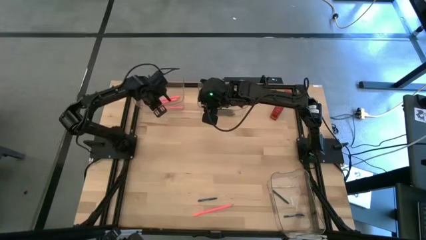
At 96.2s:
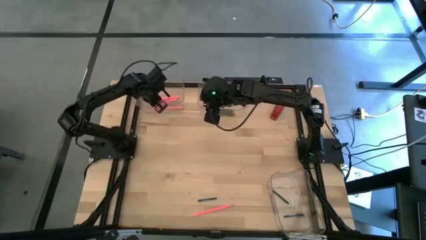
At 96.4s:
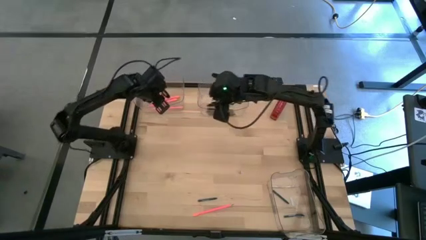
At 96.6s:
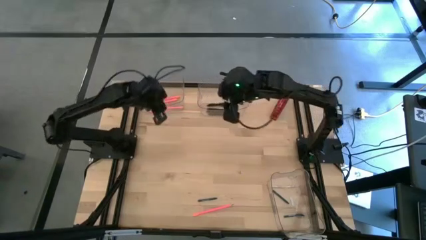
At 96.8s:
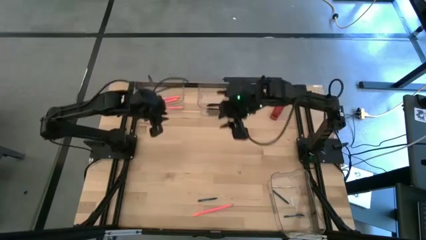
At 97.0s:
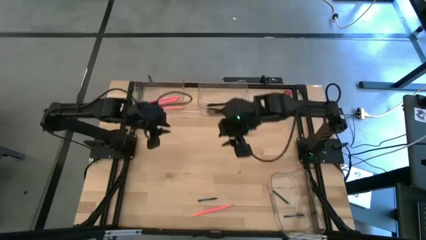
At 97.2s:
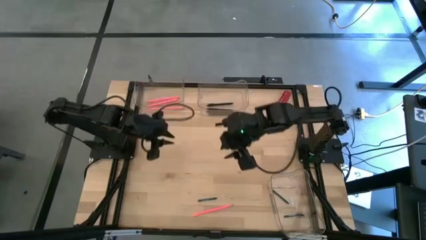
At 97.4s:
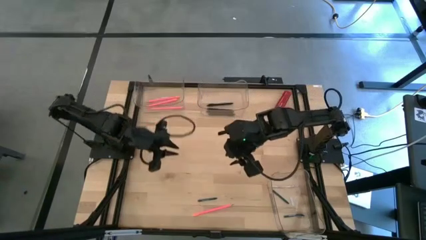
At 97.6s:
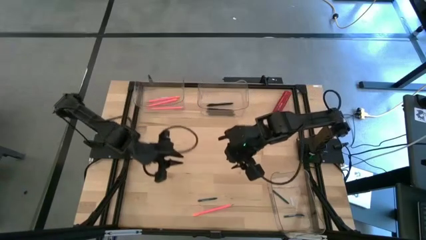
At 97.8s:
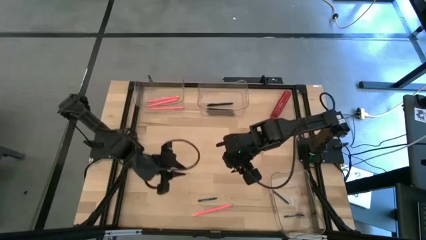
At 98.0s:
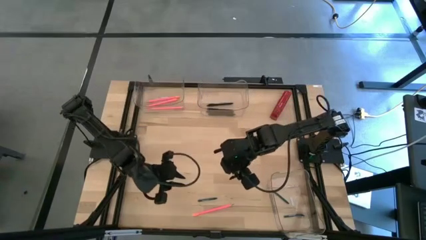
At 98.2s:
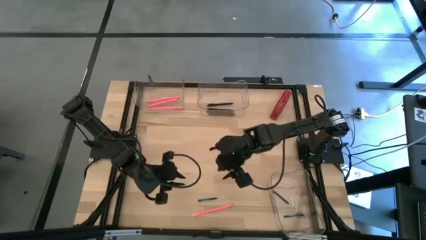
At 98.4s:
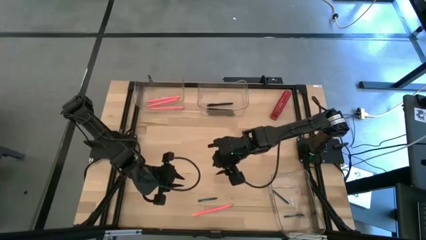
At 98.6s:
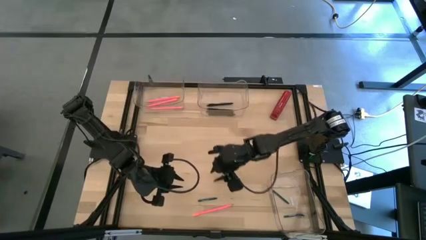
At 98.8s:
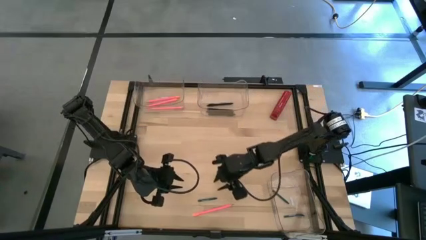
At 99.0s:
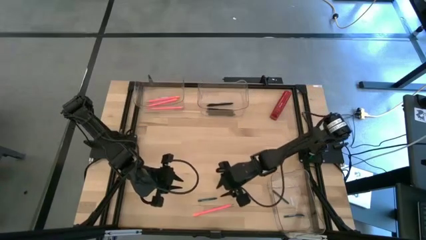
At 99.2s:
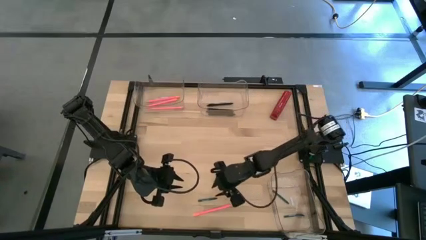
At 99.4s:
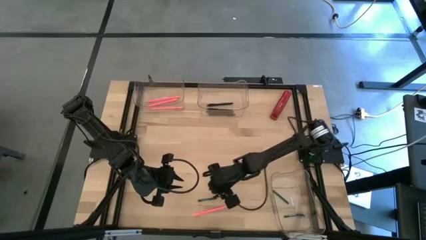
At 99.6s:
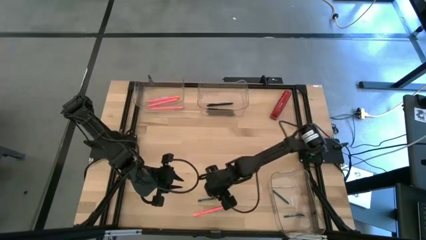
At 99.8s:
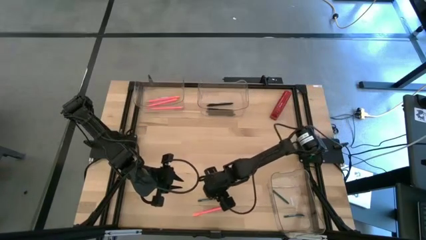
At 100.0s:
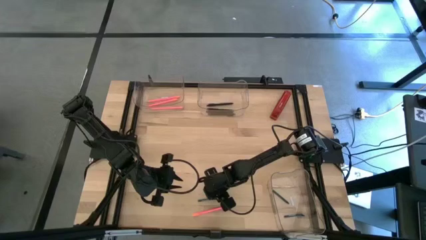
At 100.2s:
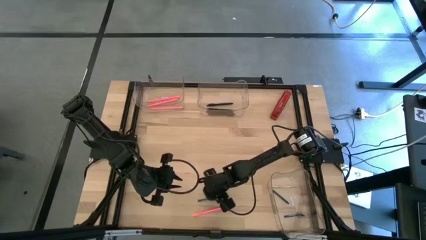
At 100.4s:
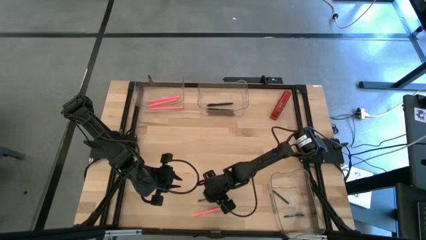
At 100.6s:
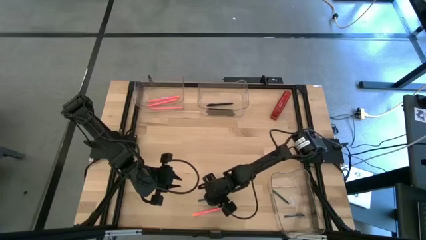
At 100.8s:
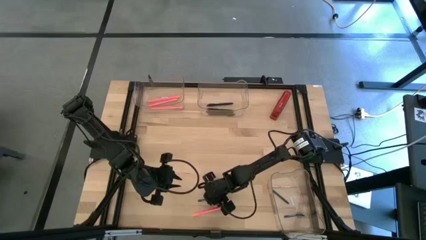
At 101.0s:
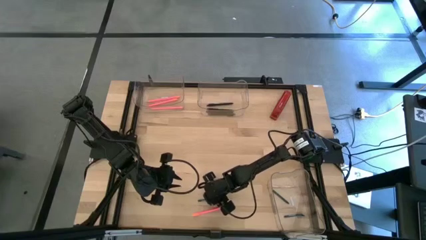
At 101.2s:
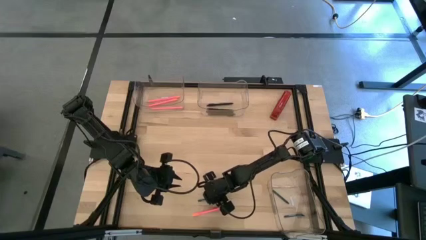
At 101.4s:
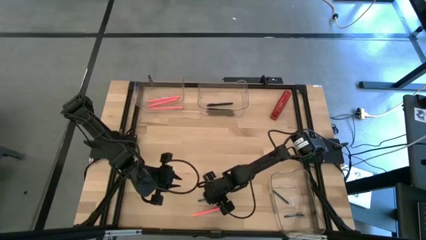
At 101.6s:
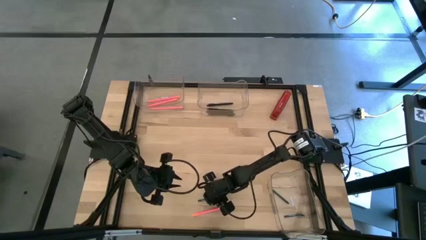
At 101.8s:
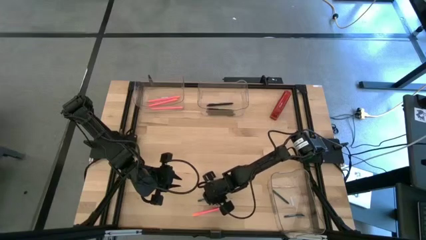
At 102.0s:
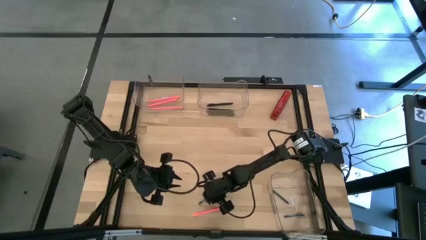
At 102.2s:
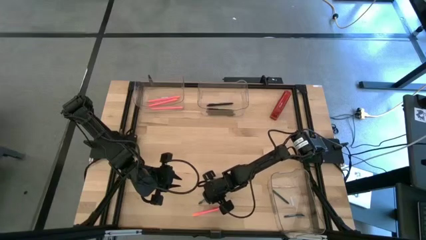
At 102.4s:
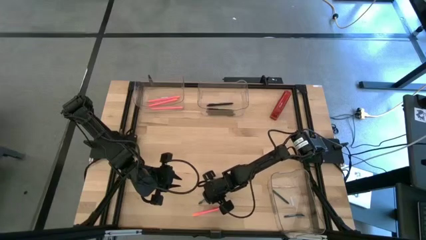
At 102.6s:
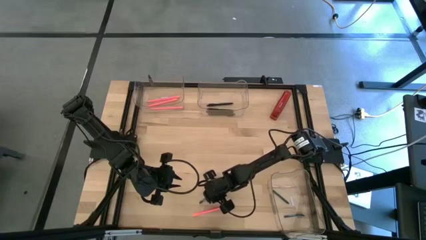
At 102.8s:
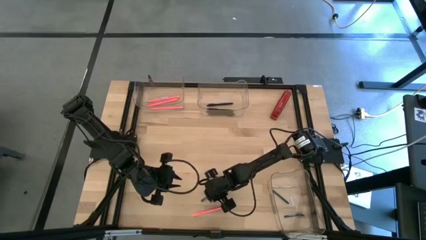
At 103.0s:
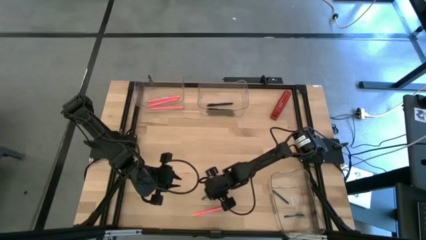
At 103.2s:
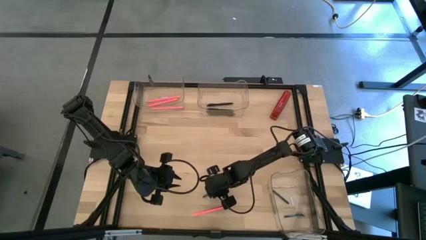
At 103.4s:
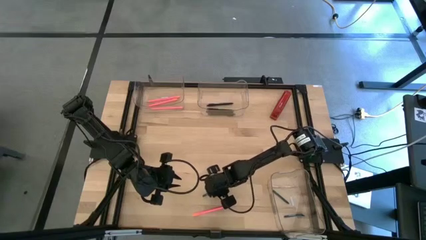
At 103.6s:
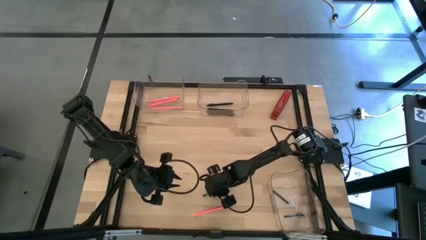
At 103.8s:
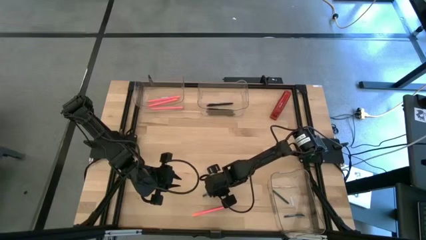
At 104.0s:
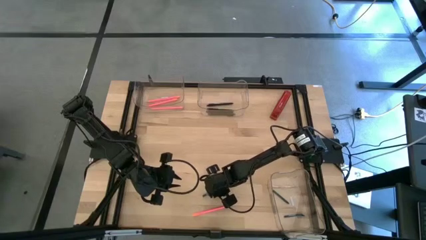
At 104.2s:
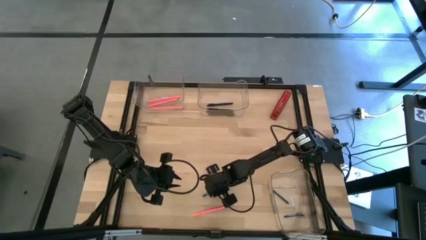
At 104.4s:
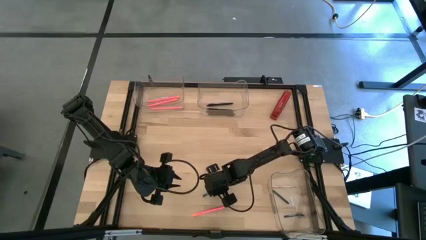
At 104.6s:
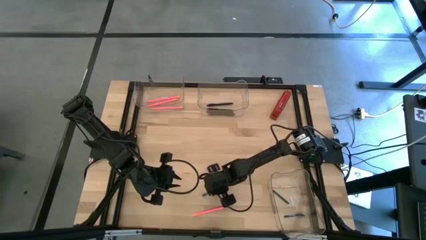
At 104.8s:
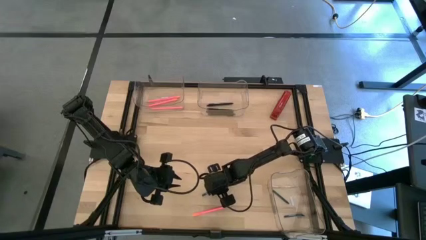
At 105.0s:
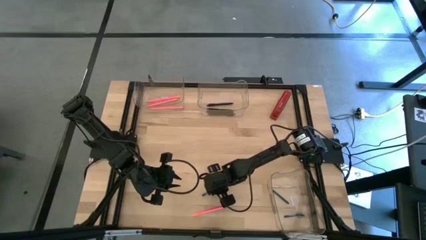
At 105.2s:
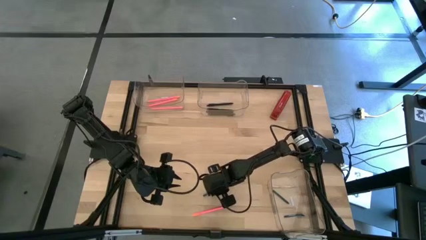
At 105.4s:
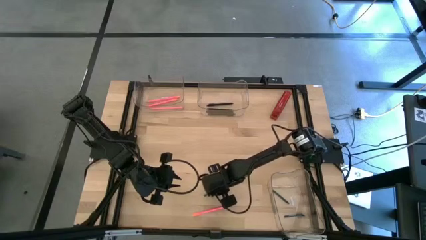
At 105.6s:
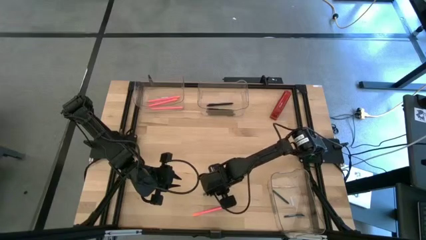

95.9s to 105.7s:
Task: Sort crayons/erasers/pens/pencils in bins
Put the green crayon into the bottom transparent bin

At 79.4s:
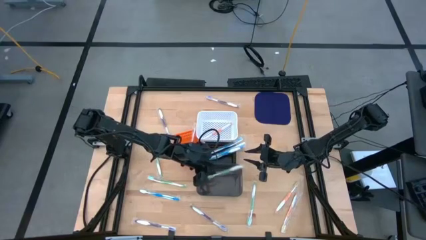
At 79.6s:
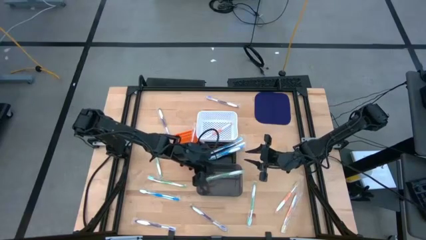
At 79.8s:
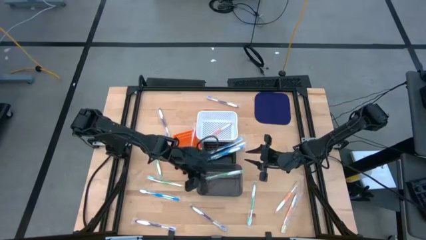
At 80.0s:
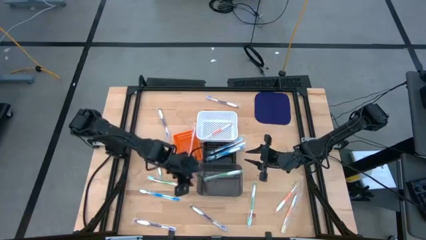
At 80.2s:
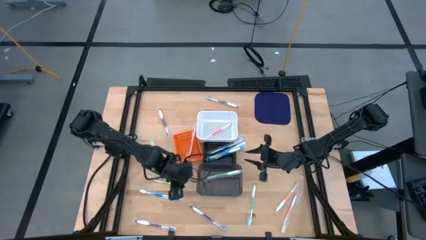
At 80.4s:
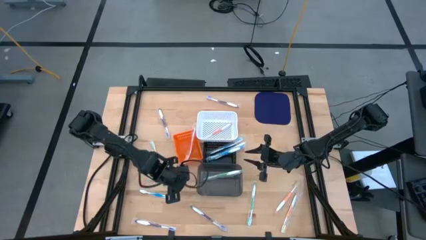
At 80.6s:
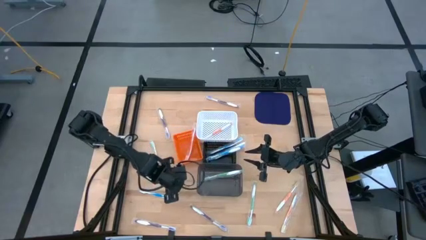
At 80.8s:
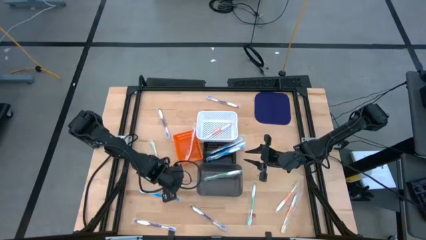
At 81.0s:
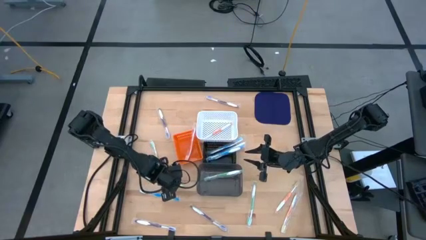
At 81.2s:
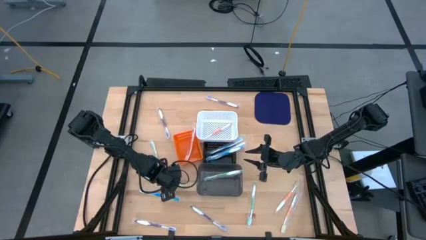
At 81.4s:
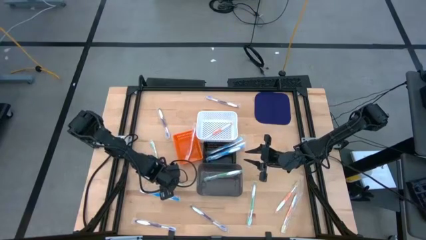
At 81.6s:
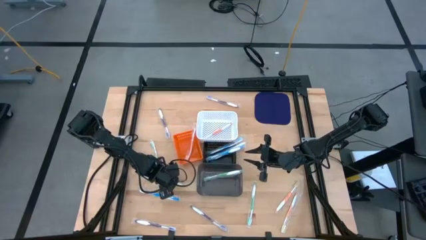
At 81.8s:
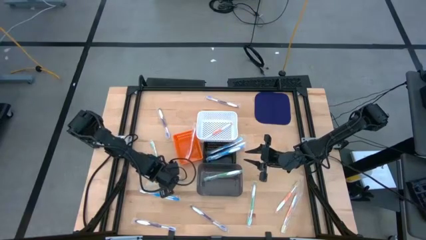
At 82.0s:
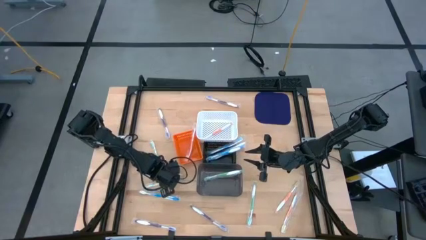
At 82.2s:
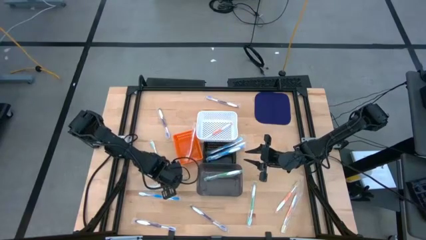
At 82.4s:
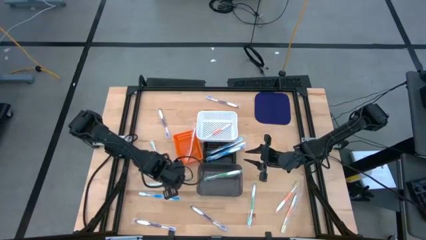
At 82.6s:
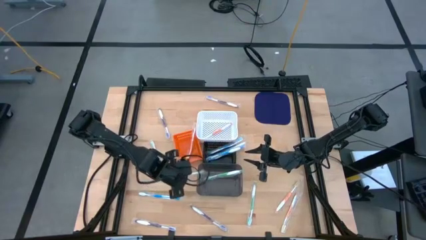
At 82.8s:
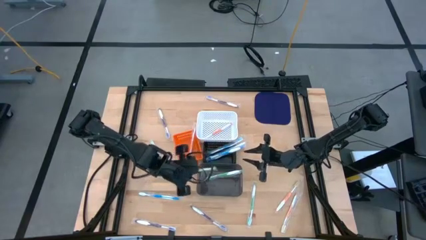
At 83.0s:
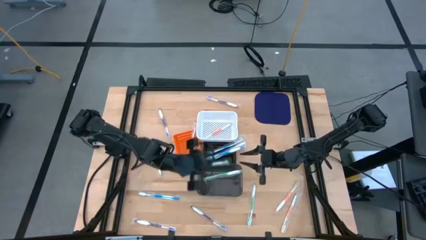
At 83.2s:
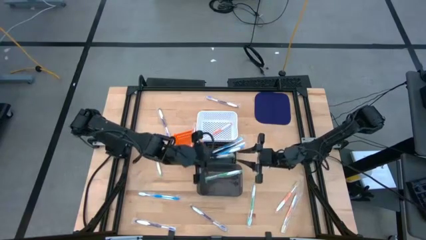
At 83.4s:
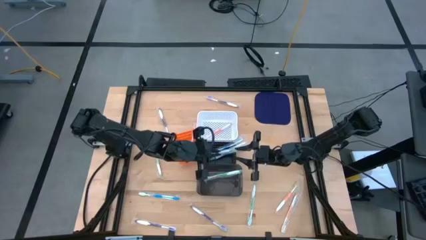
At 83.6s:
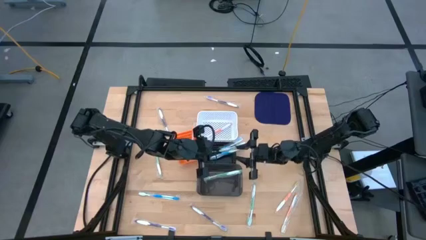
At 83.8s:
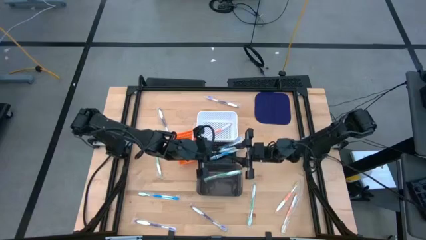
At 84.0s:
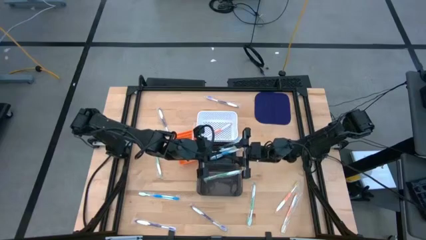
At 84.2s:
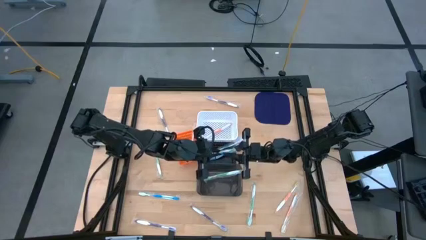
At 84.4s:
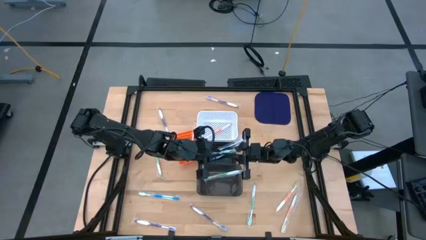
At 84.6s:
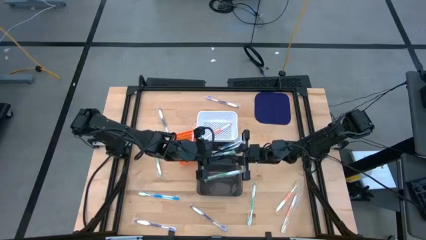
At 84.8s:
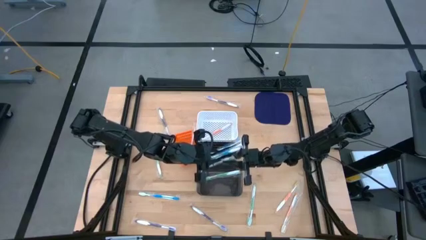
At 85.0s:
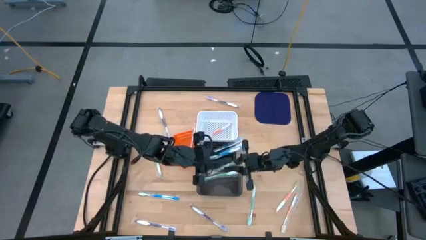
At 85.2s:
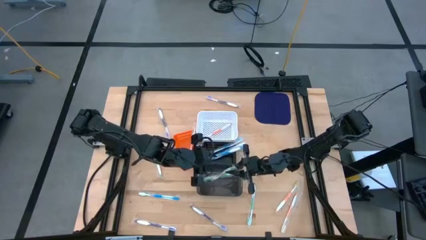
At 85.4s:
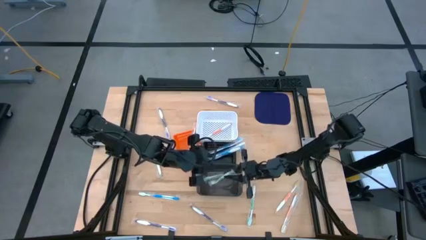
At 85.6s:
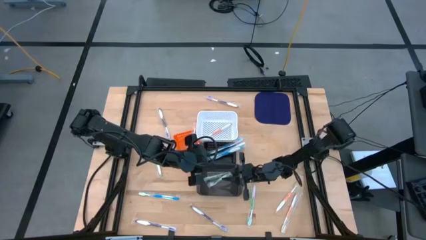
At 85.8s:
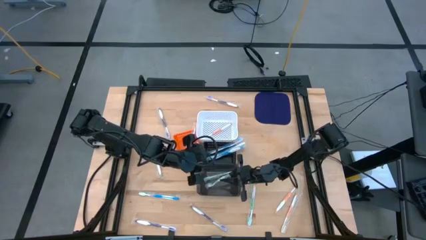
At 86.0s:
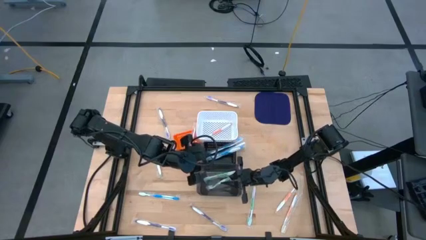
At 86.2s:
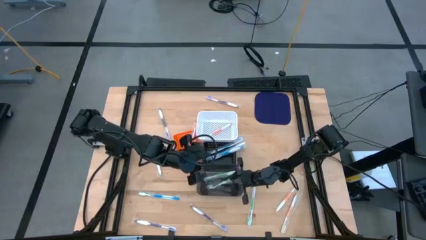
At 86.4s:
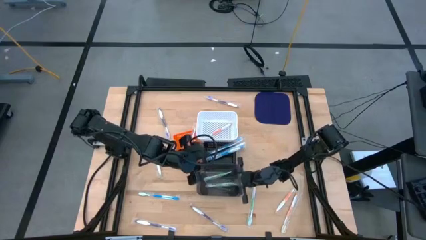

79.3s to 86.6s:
Task: Pick & Place Toothbrushes
Put the middle left green toothbrush into the black bin
